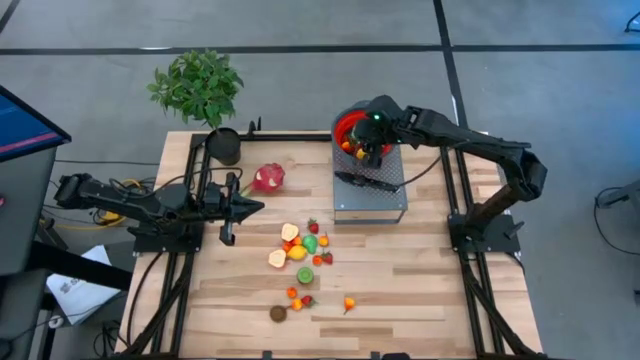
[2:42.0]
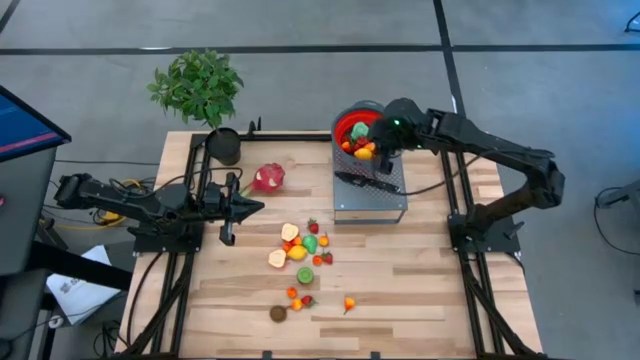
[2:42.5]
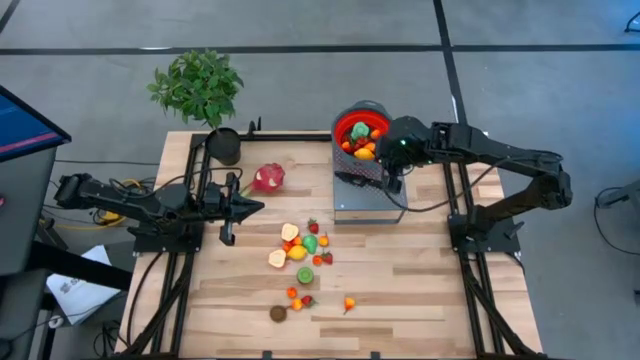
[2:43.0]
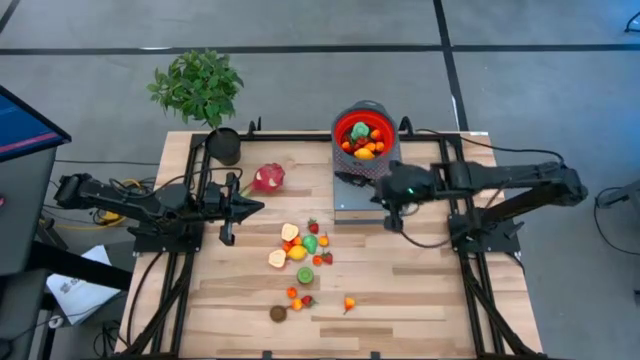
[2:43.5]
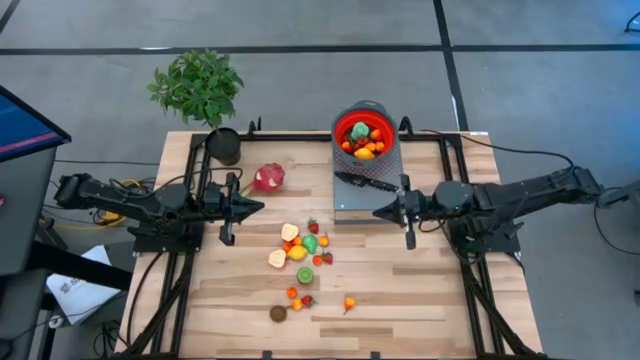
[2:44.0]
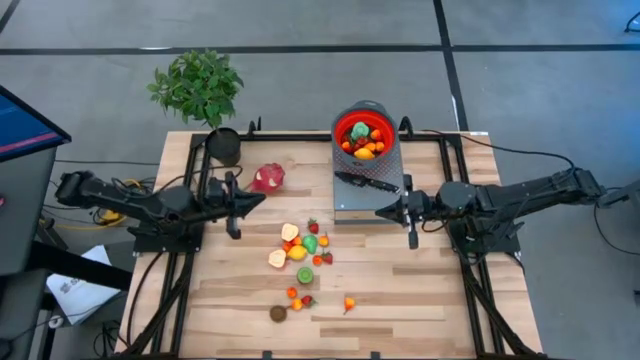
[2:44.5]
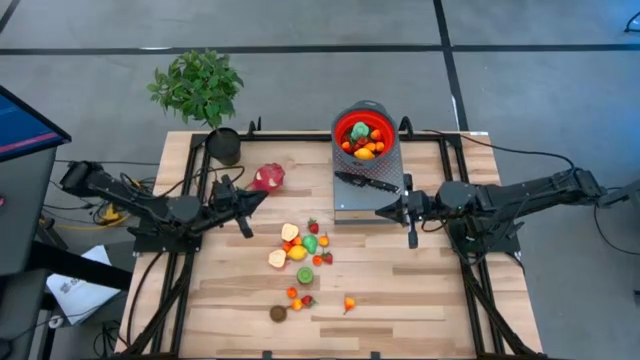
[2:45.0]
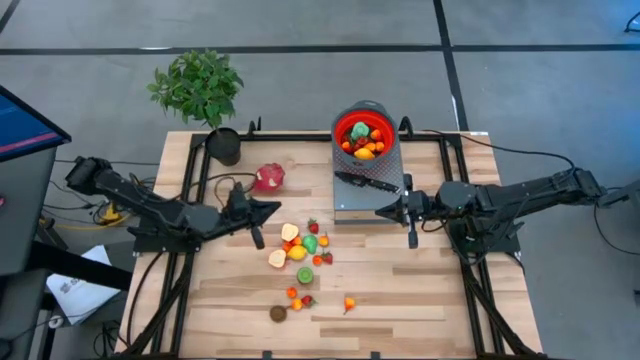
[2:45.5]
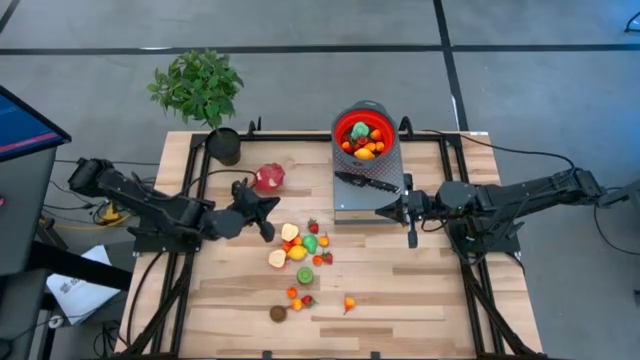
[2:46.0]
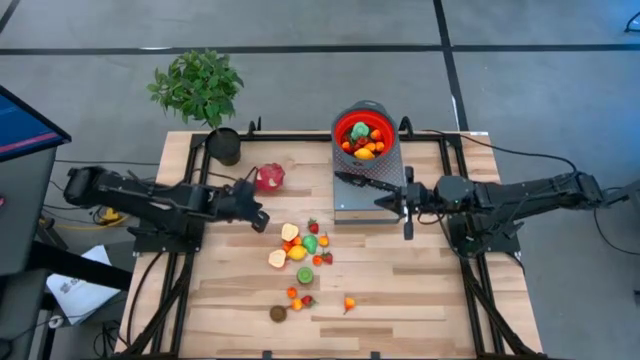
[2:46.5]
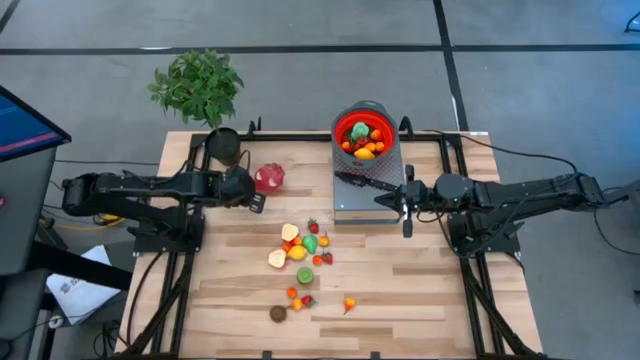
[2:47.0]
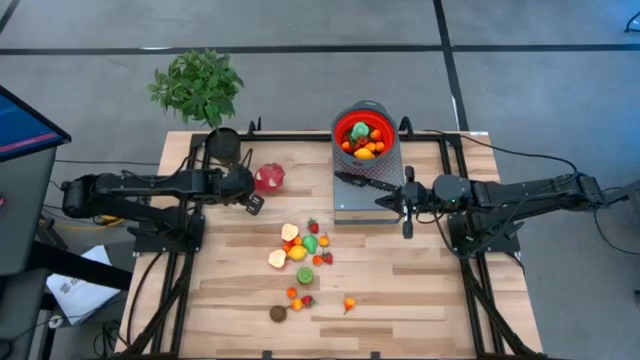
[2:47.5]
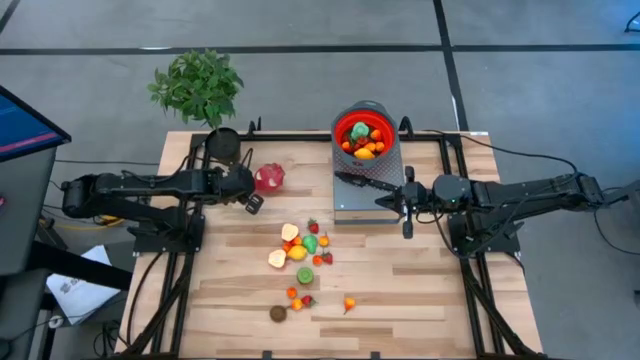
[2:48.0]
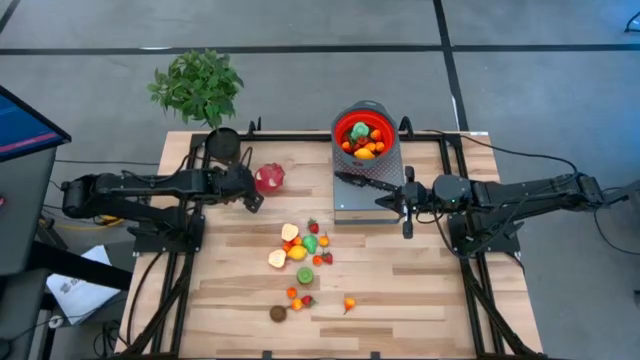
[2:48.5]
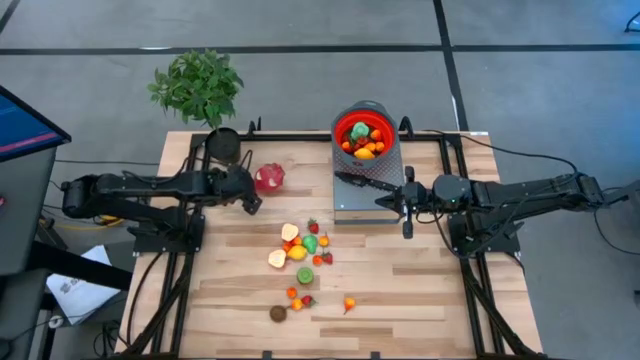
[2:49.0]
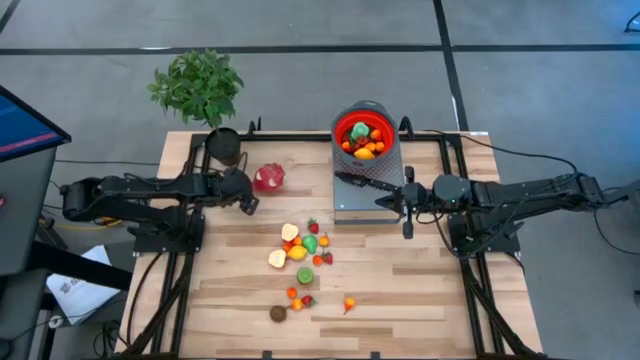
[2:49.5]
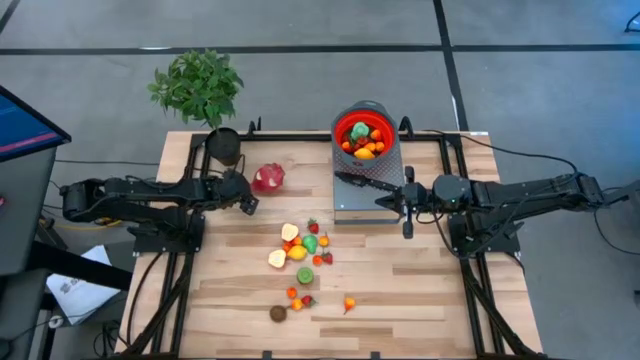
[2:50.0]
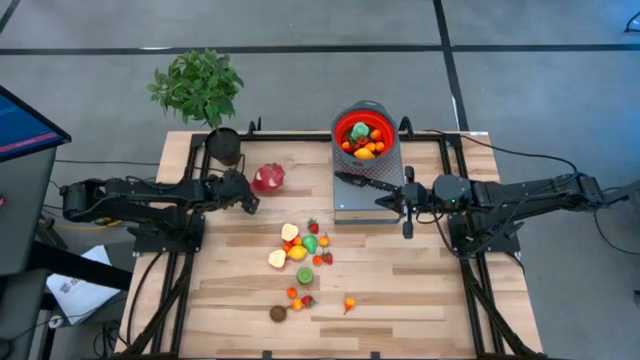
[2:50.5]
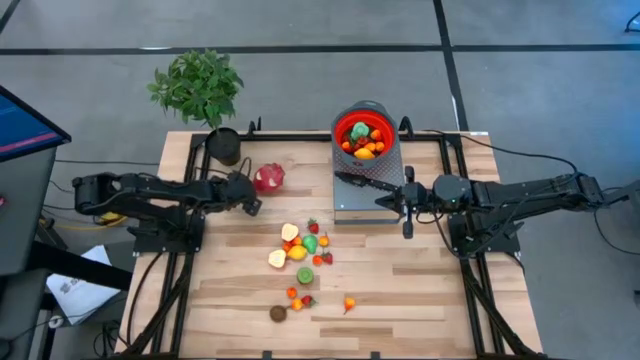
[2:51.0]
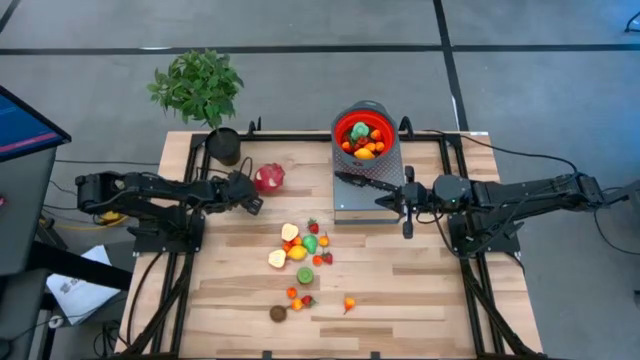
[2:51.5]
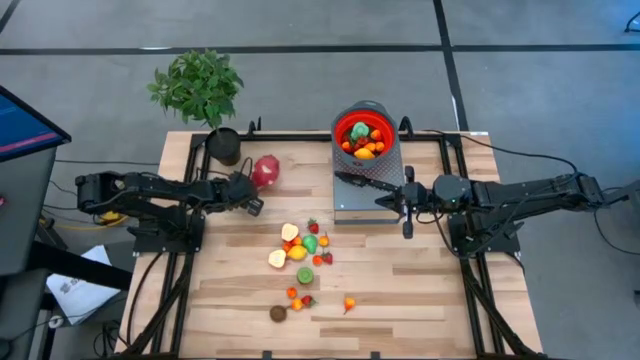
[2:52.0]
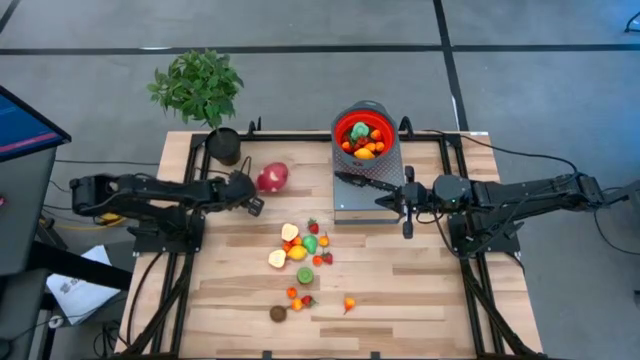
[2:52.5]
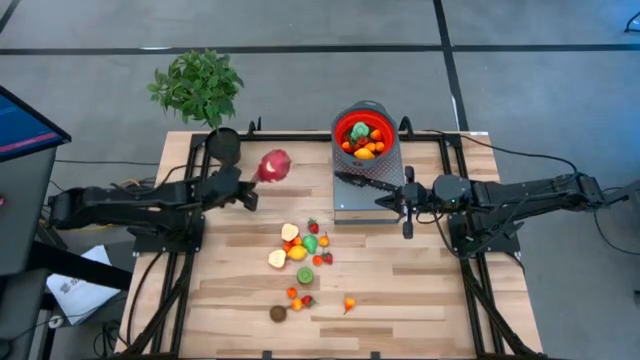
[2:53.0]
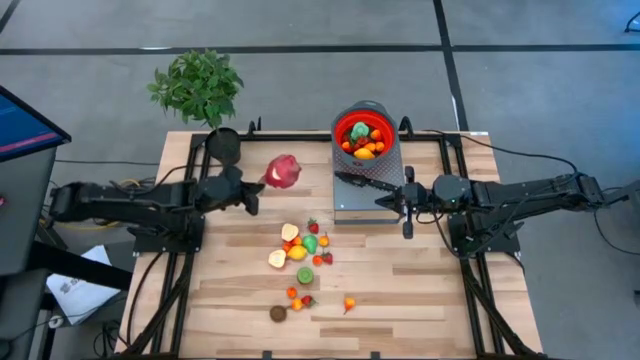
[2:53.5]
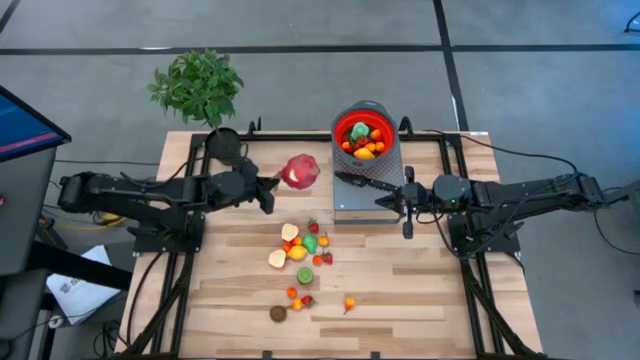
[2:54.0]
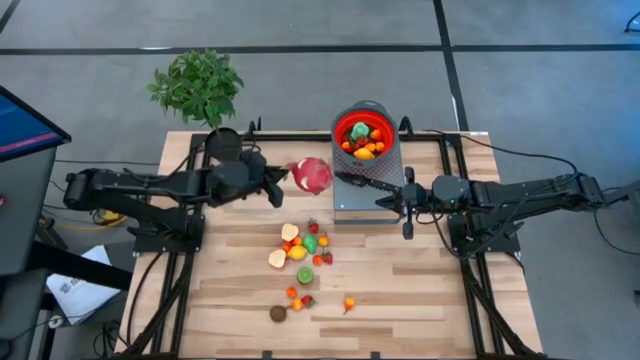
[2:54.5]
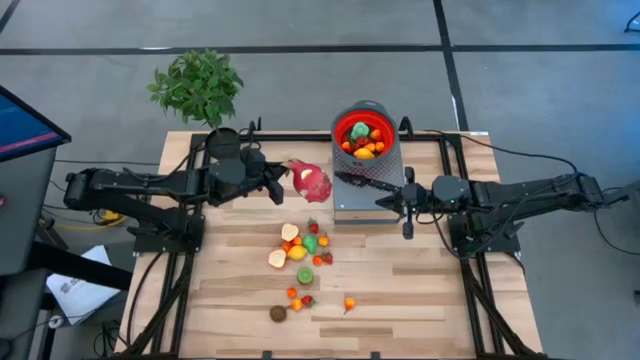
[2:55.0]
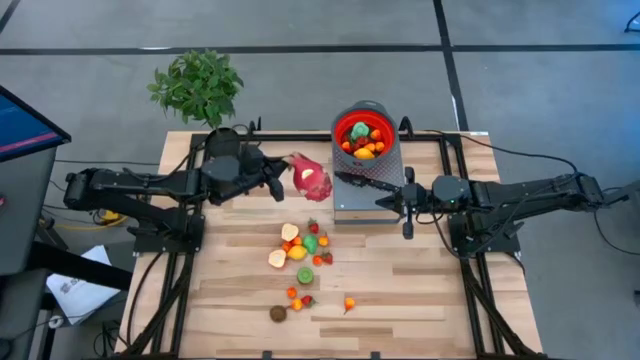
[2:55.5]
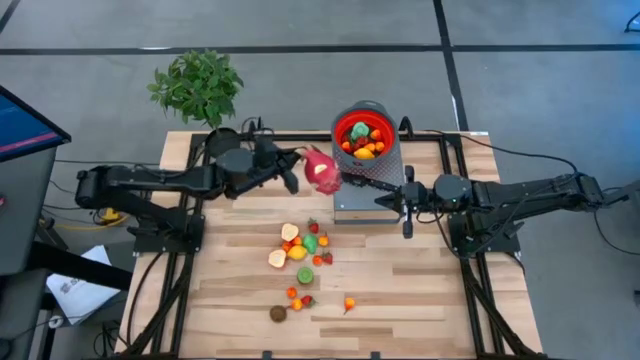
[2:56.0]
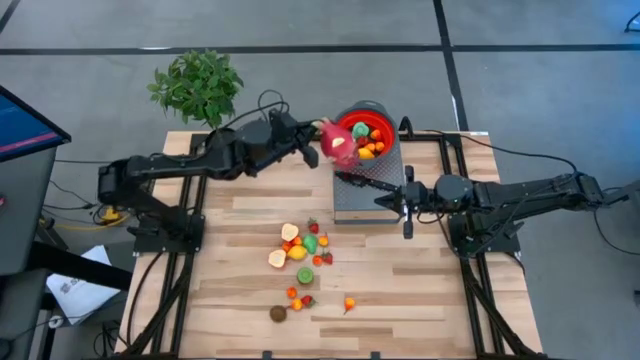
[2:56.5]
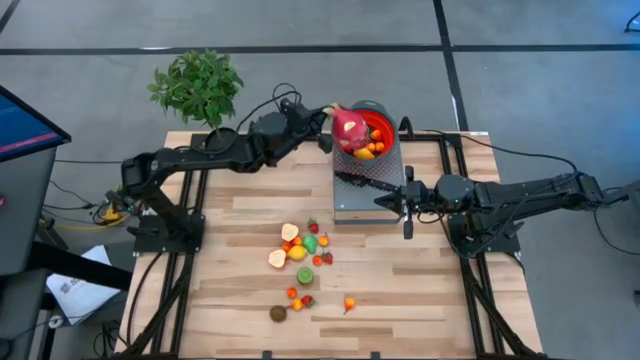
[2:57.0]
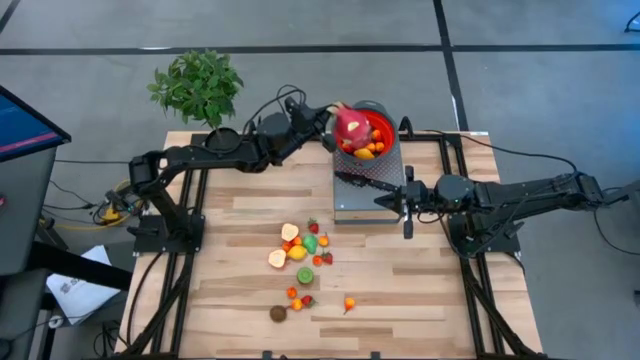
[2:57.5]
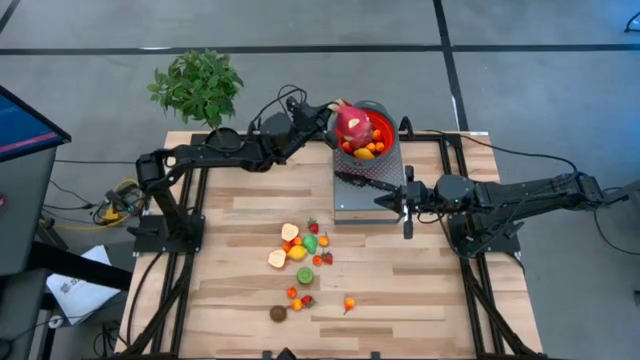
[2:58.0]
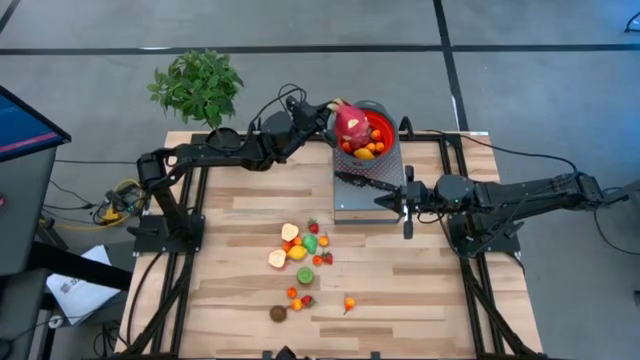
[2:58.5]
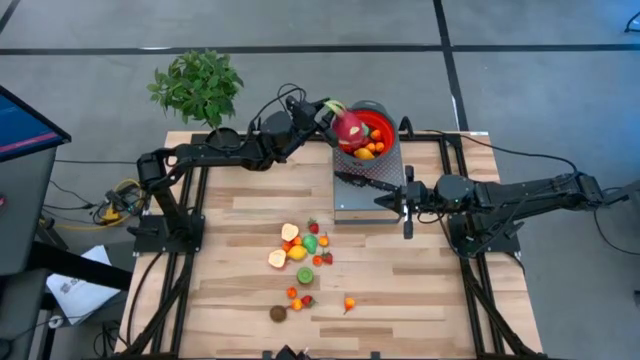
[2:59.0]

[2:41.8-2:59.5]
Task: Pick & Place Fruit
Put the dragon fruit into the red colander on the shelf

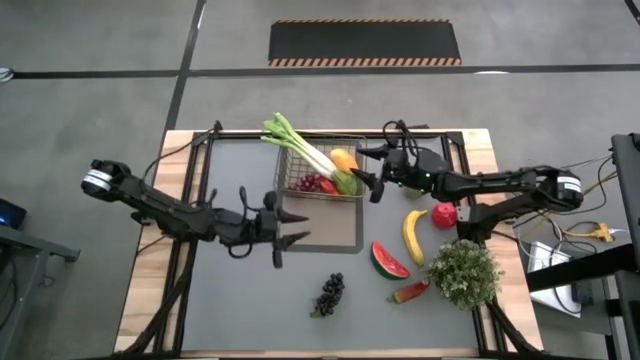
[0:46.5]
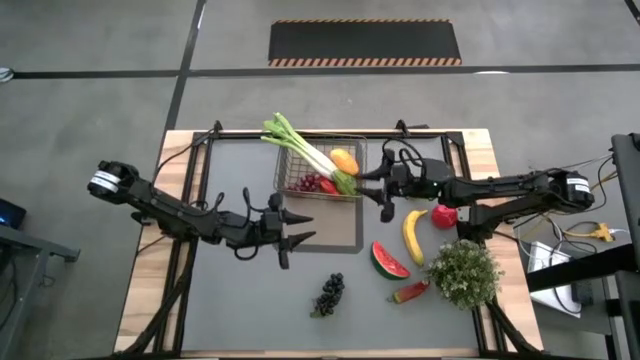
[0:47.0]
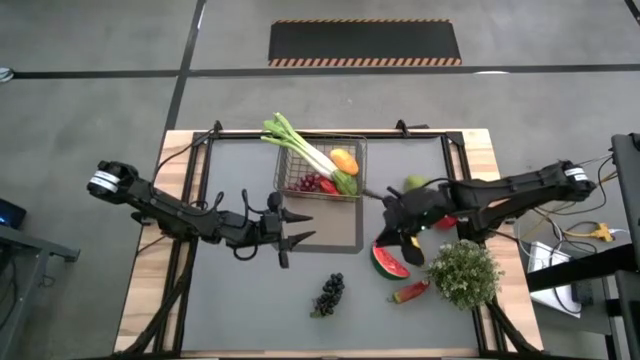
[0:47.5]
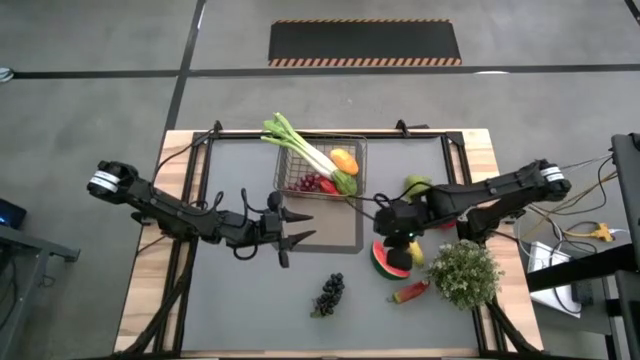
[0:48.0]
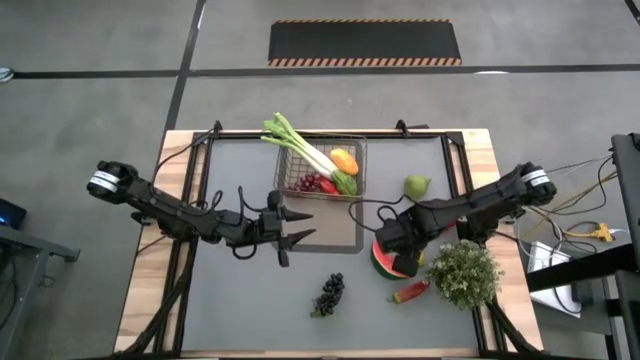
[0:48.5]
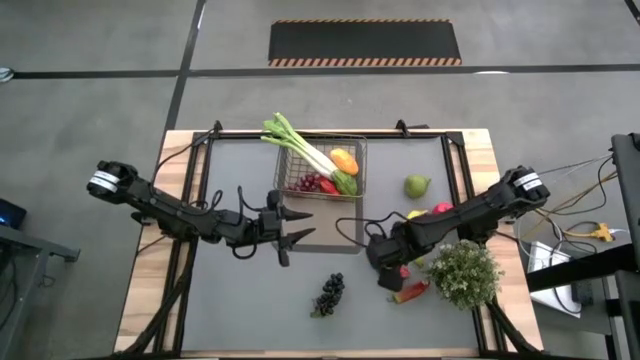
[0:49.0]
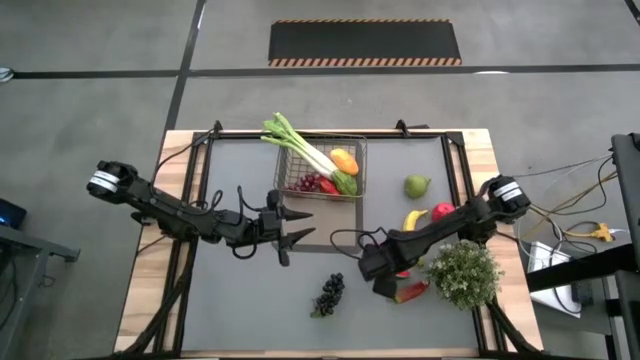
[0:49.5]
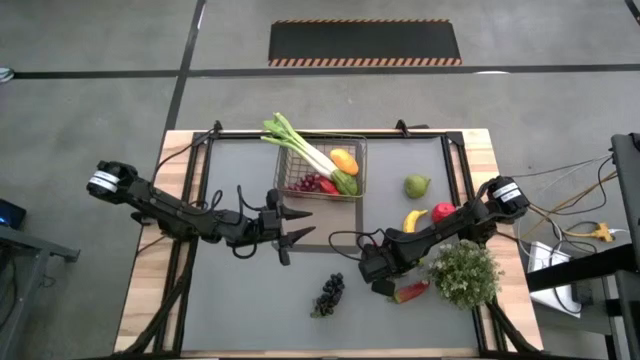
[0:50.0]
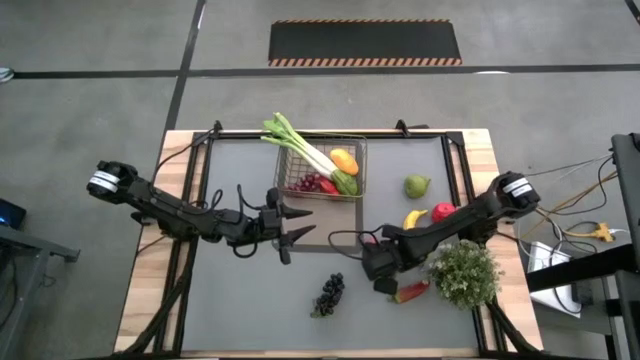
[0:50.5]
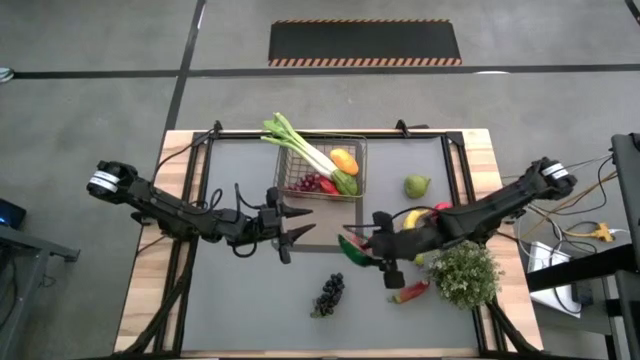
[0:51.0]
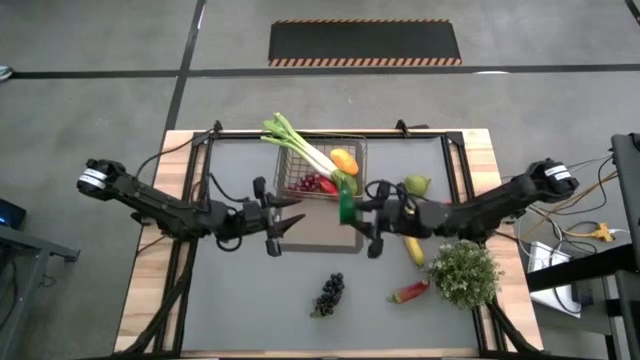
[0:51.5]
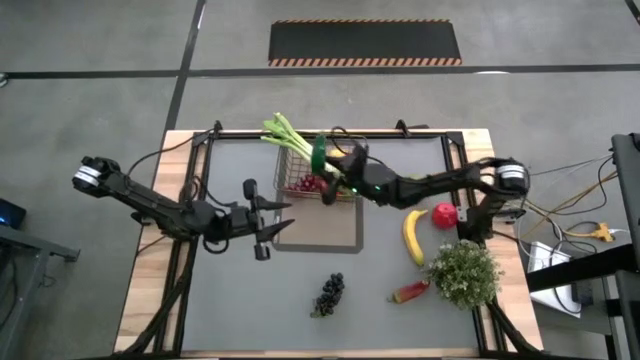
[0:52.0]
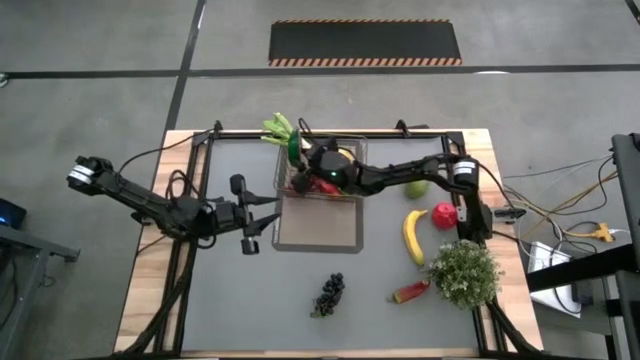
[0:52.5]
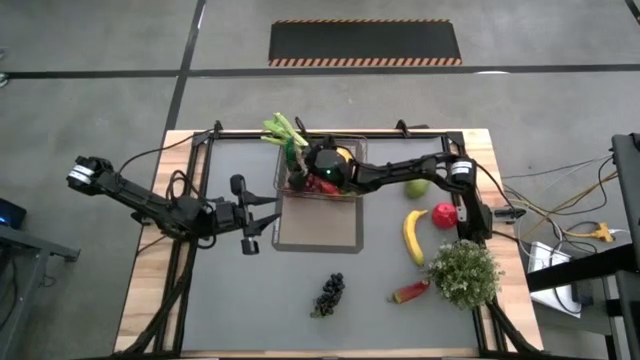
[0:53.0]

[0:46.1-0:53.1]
Task: Build produce basket
Put the watermelon into the wire basket
